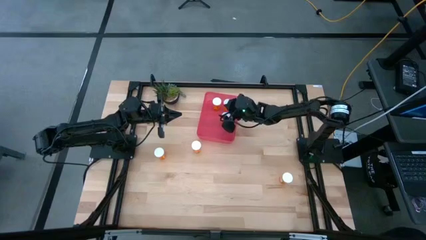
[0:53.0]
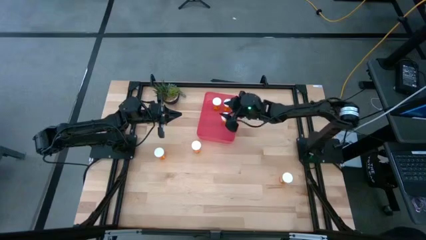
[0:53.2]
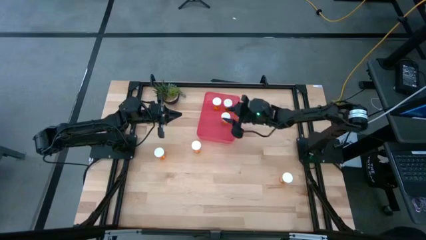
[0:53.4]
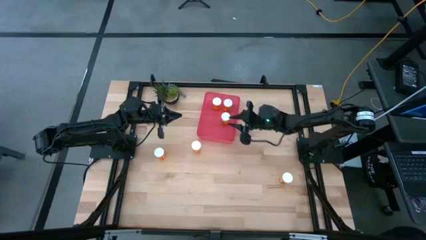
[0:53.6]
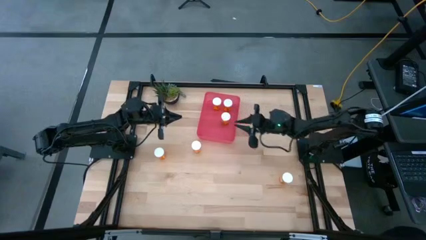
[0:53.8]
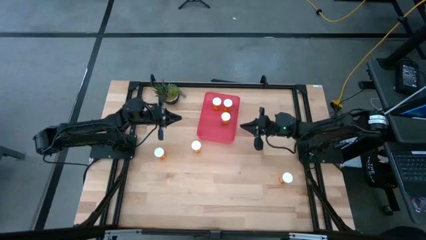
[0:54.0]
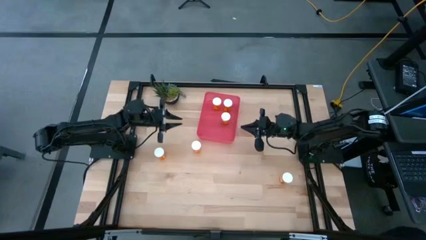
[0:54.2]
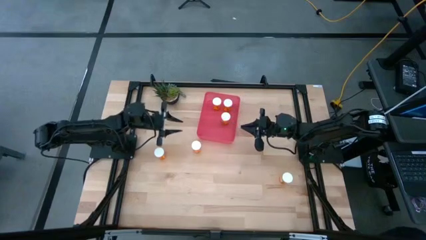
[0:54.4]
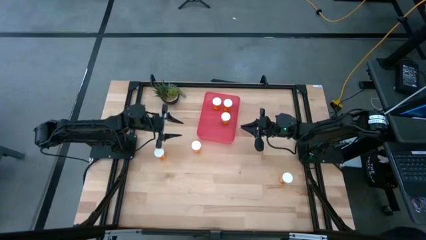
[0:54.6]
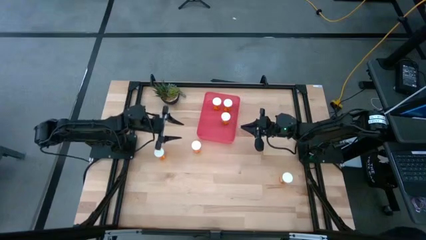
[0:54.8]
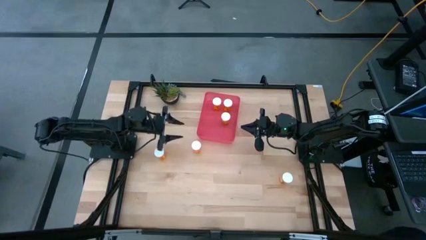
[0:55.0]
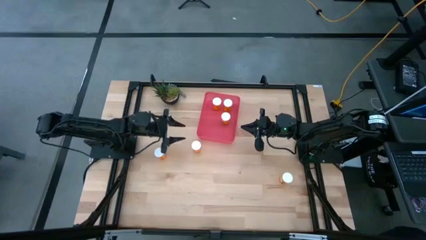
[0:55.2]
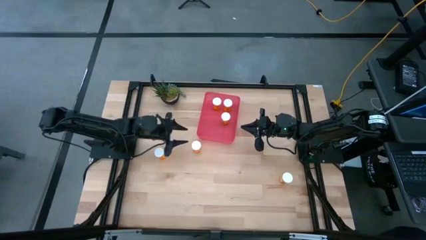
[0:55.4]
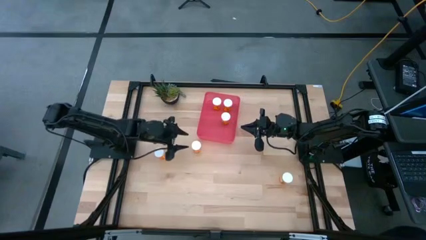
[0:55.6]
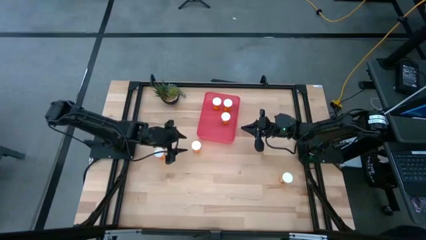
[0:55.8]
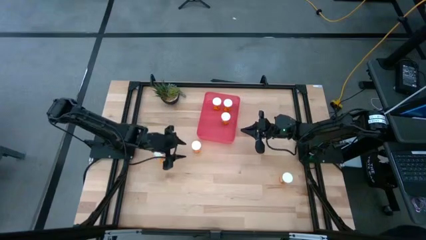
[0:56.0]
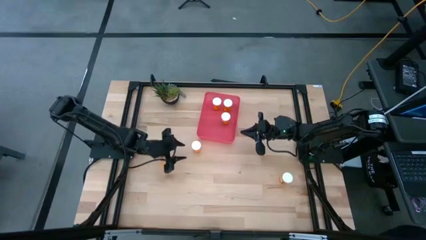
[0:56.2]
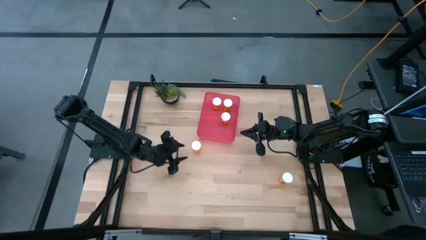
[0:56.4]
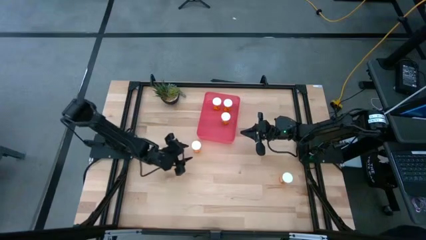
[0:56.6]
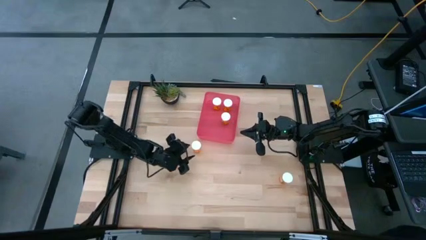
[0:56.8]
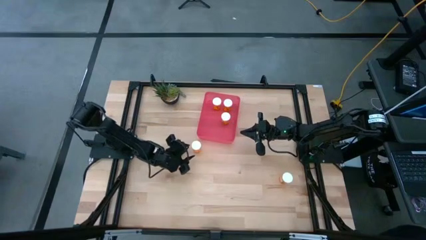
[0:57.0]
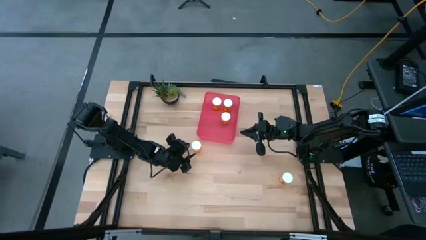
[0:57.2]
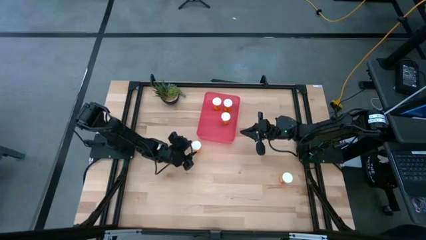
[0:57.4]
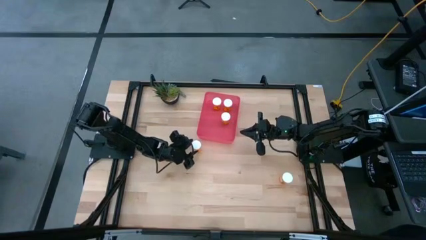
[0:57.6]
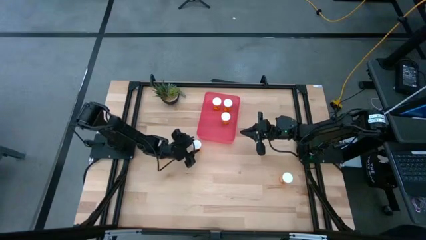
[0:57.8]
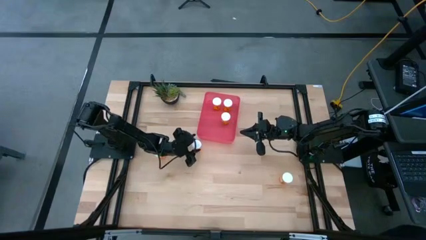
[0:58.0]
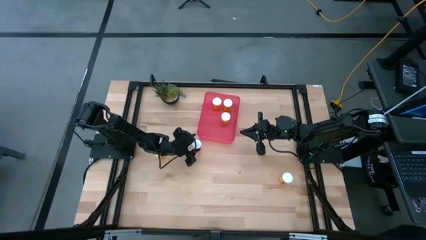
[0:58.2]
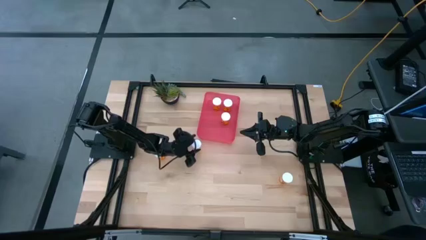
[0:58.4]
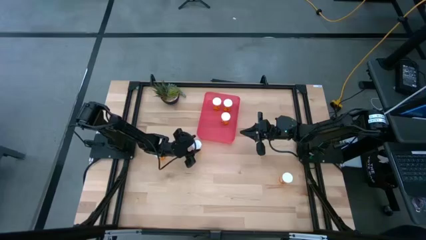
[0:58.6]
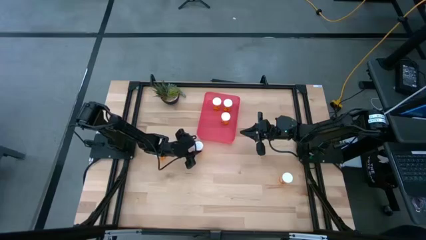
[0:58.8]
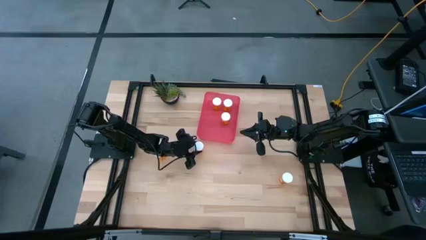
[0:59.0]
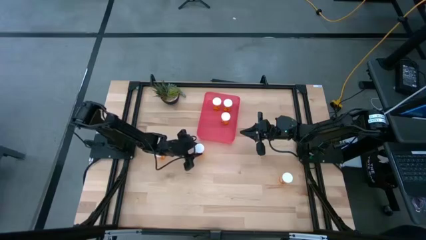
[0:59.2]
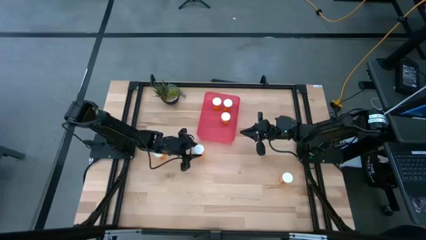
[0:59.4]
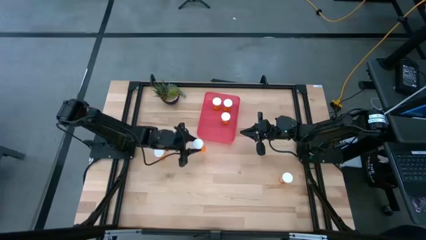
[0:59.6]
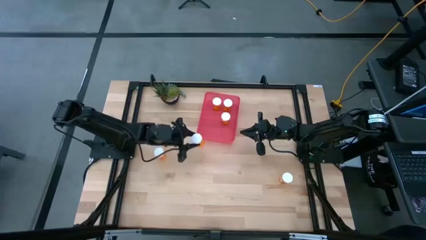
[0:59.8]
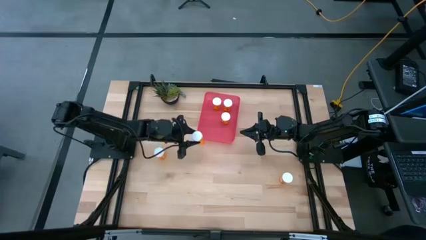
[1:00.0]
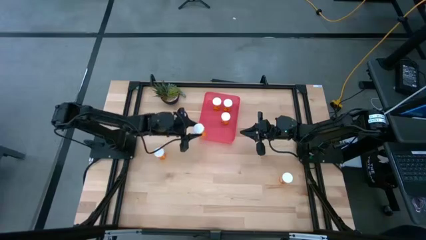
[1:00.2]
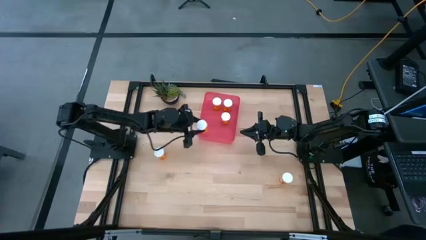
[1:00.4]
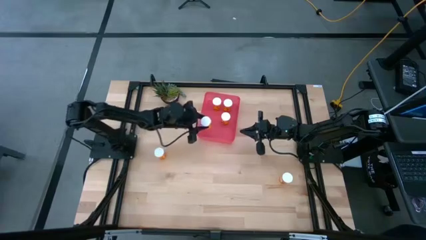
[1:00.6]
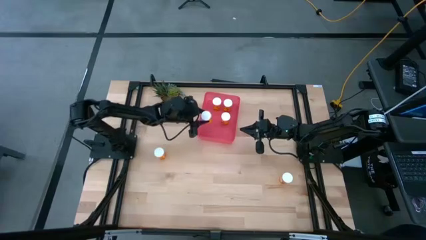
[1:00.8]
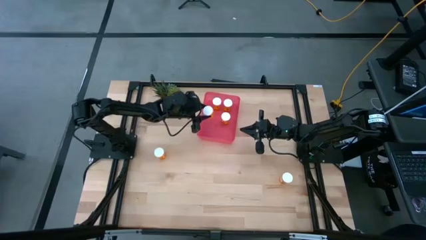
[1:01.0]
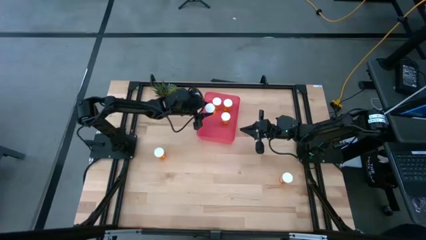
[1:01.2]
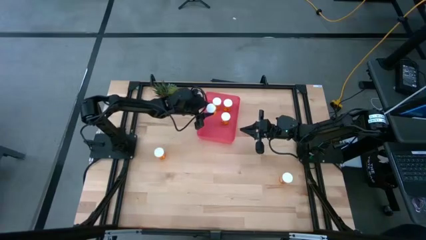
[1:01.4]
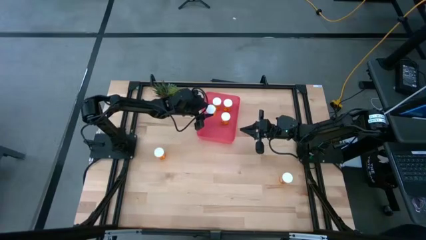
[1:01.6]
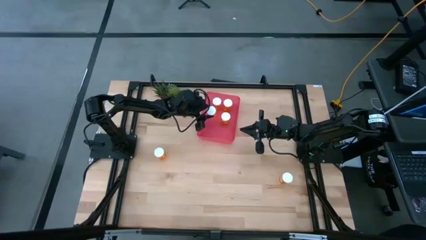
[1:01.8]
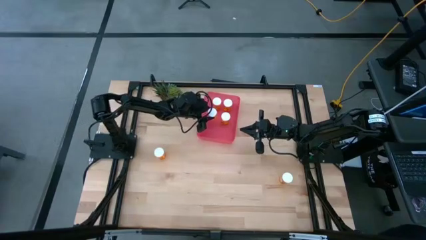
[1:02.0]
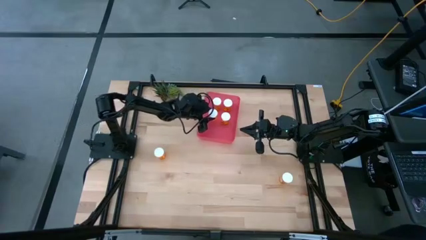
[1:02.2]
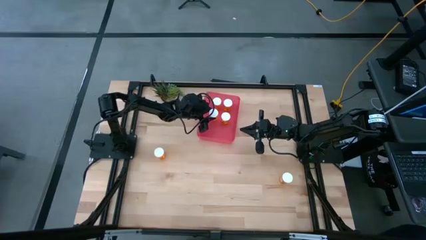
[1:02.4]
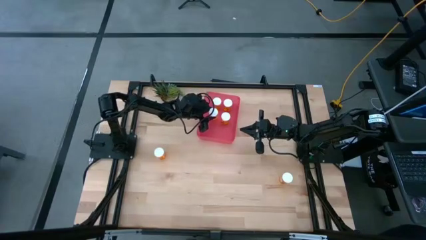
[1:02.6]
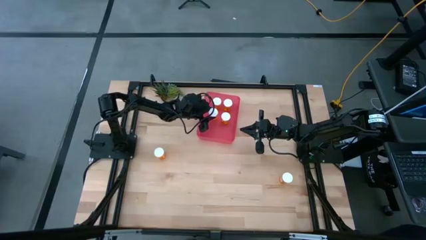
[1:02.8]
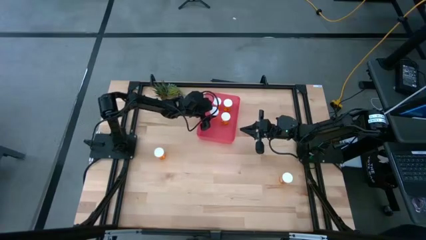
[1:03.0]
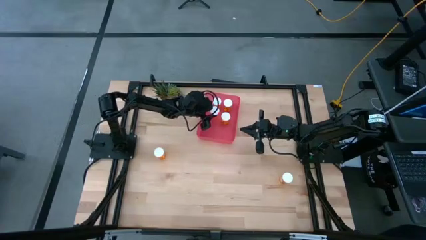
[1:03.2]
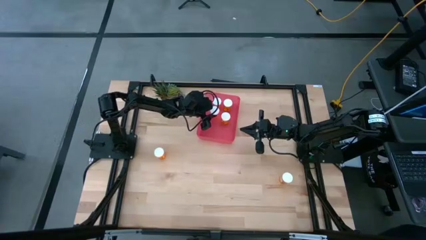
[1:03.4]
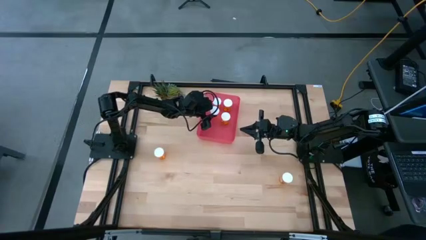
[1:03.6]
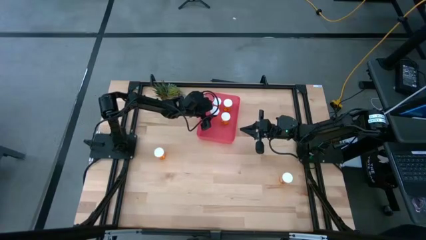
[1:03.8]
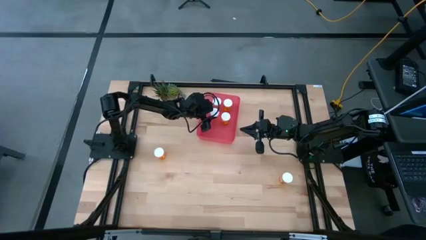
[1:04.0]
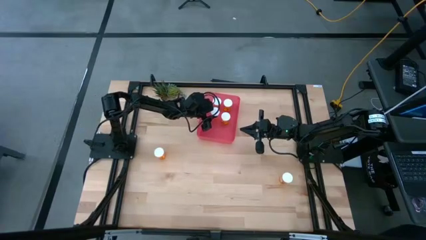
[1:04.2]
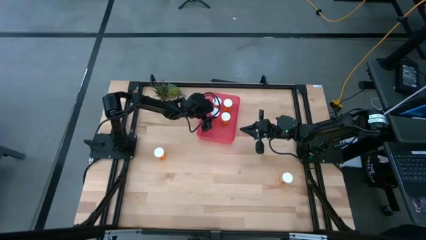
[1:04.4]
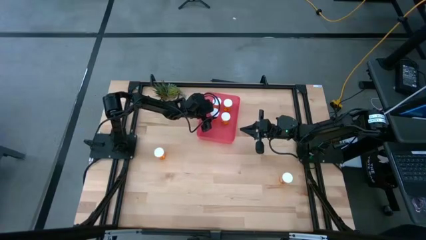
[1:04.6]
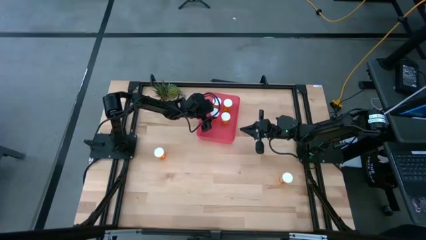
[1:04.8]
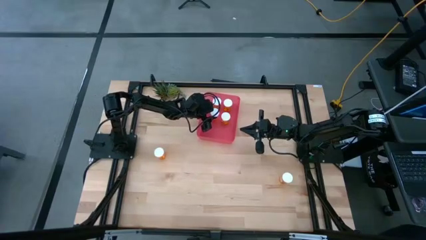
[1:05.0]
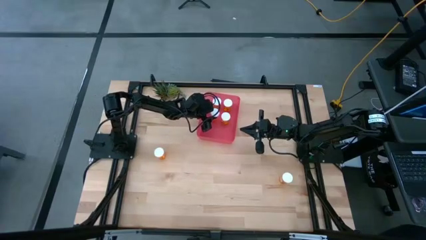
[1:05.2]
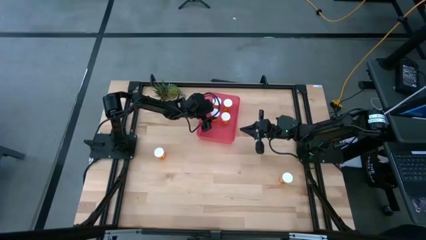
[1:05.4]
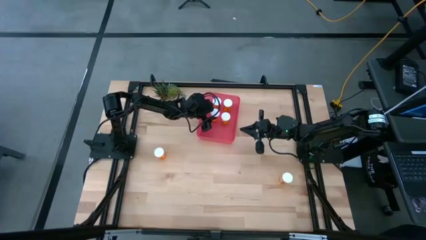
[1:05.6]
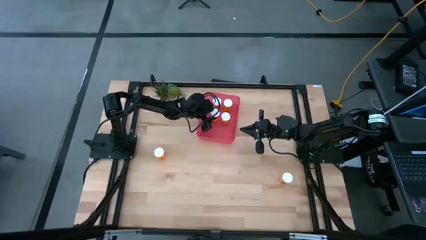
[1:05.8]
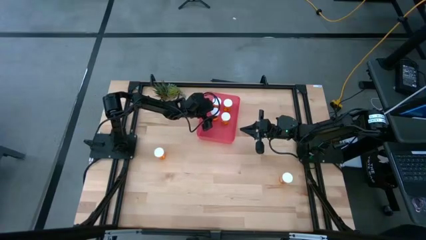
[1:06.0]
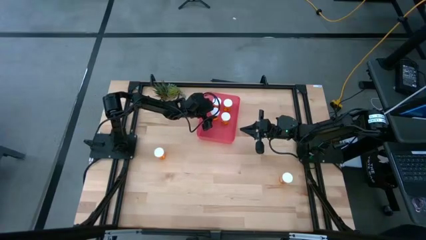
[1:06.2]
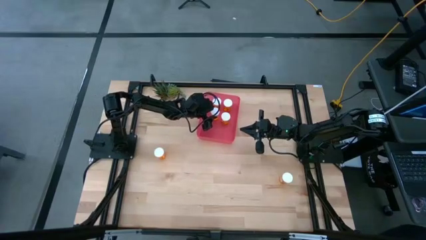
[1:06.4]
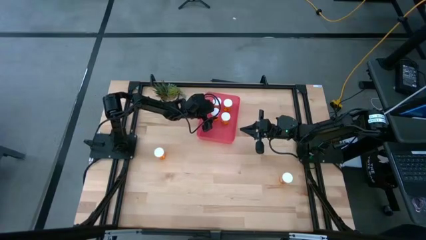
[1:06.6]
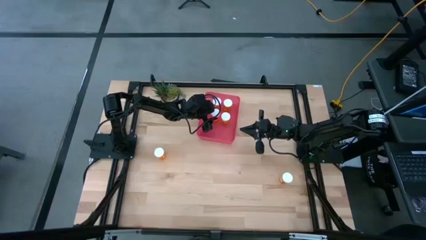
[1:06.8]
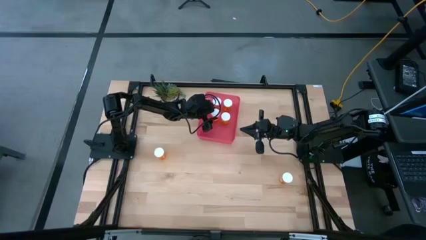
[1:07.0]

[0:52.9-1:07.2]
Task: Pick and place pill bottles into a basket
Put the orange pill bottle into the red bin

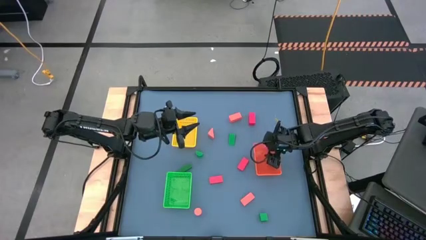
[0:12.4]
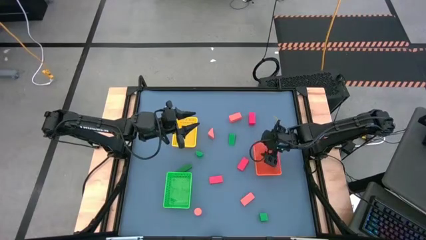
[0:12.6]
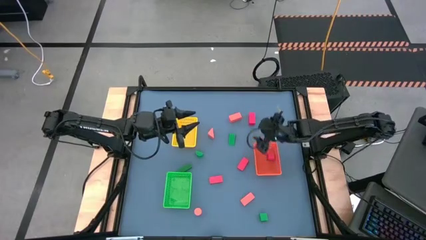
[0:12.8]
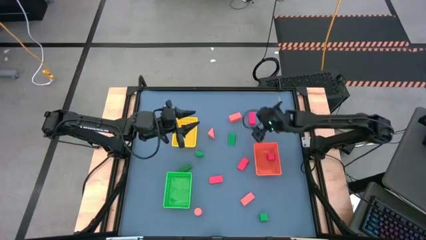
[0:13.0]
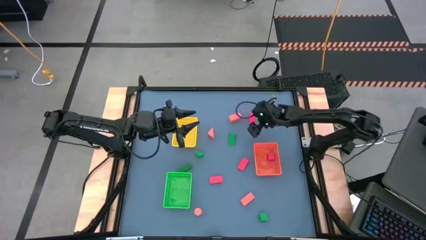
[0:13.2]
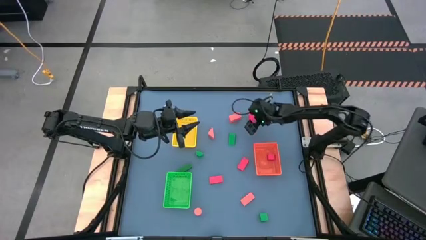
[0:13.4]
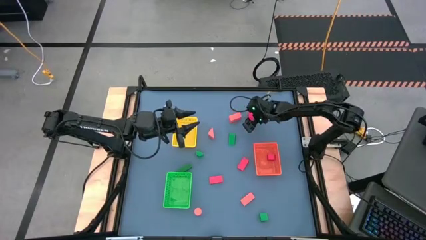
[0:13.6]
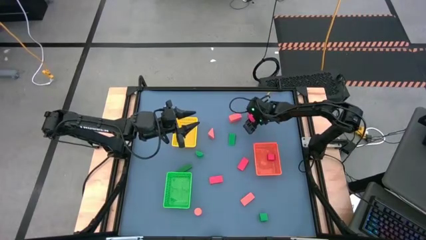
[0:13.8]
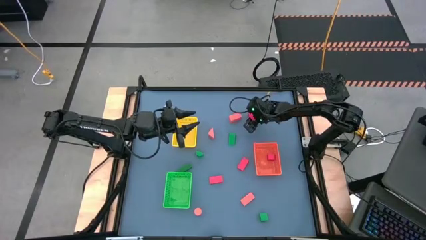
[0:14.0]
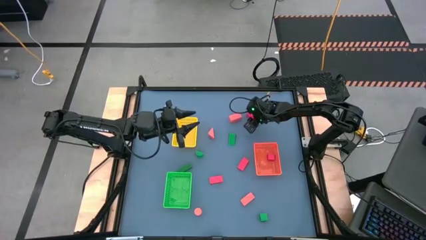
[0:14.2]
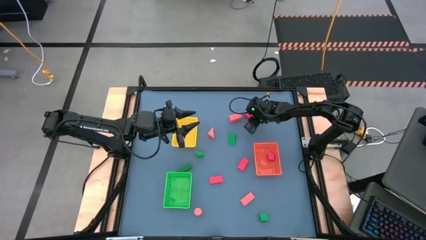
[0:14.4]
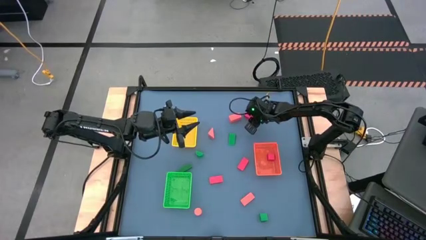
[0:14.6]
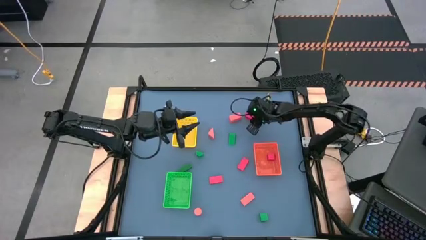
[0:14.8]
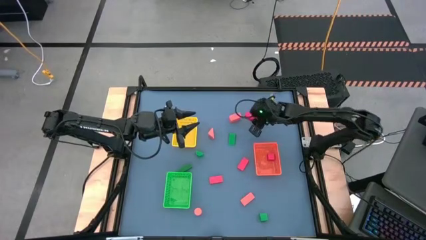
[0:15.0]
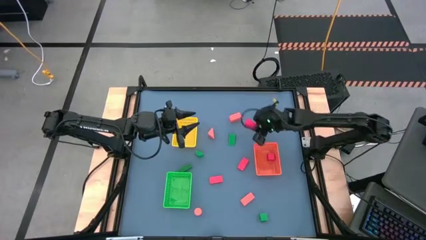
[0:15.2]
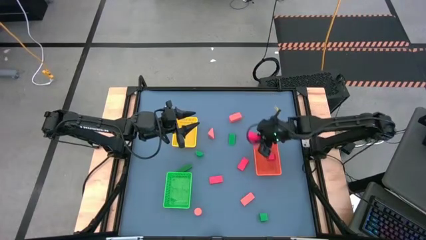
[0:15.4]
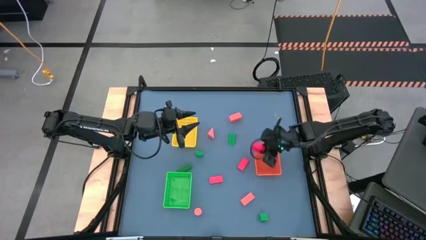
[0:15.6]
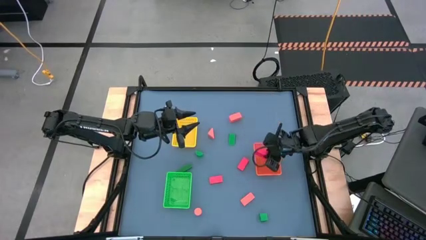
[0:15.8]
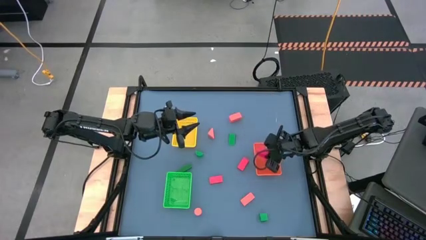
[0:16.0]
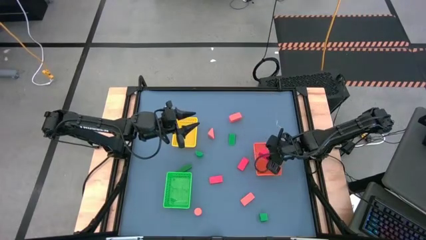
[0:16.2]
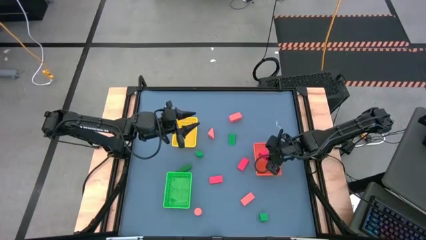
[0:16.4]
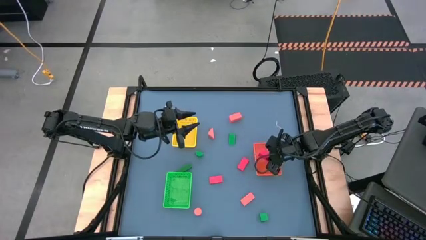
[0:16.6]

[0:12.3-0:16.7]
Task: Sort & place blocks by color
Put the red block into the orange bin
